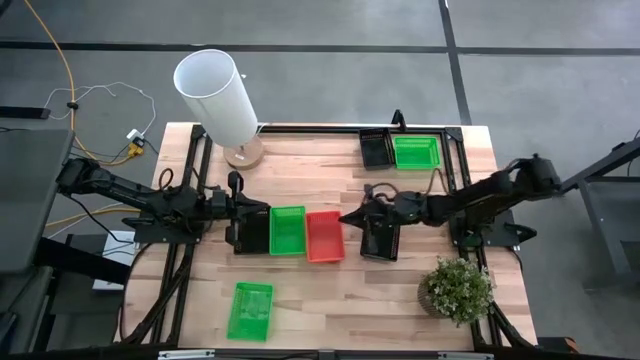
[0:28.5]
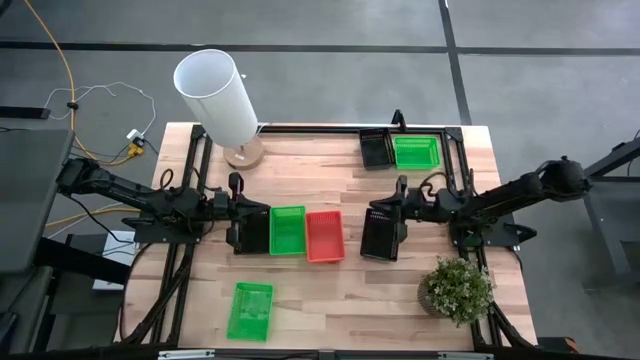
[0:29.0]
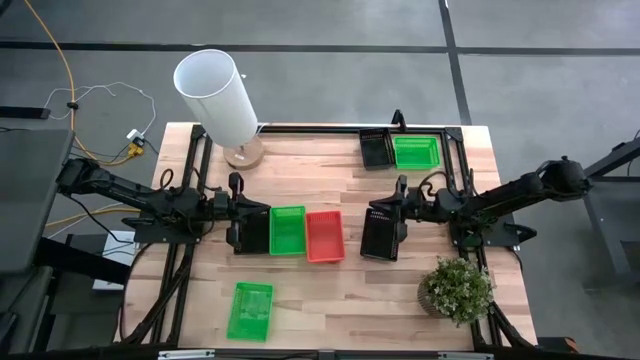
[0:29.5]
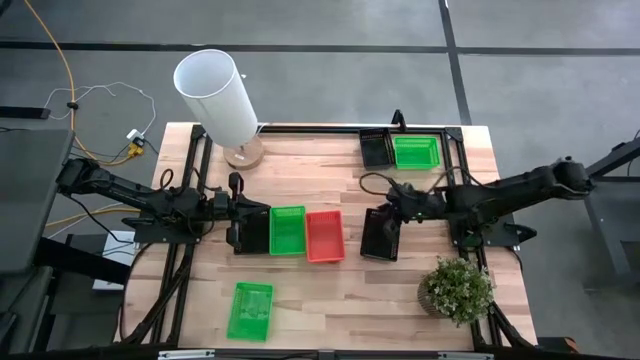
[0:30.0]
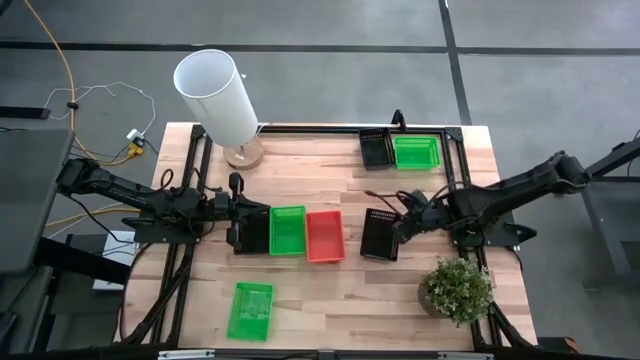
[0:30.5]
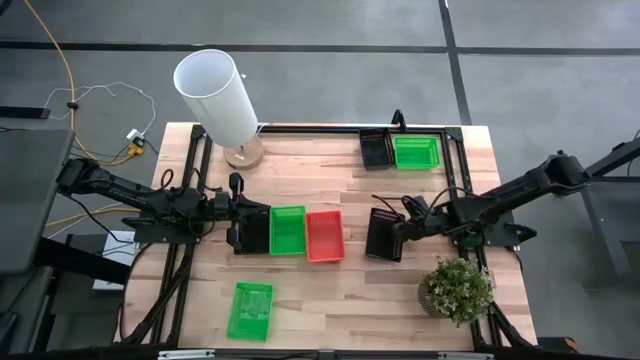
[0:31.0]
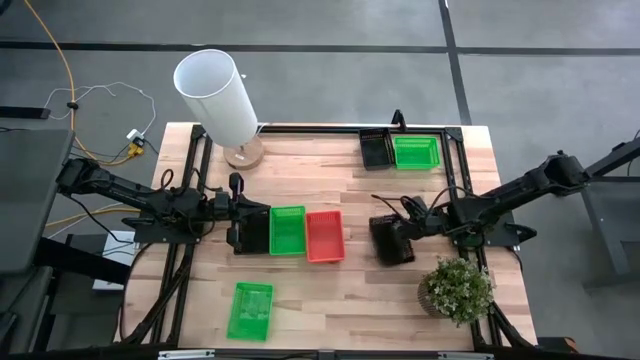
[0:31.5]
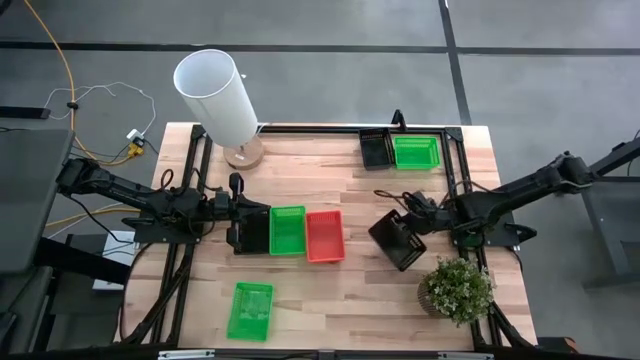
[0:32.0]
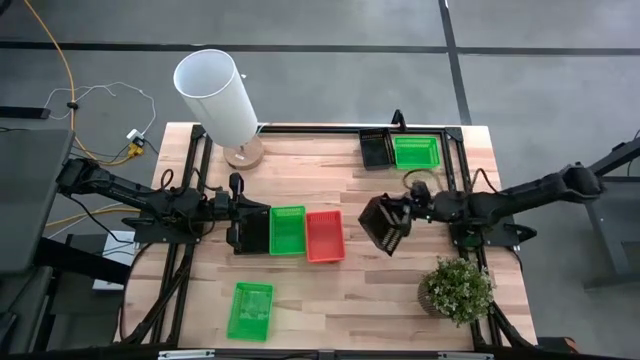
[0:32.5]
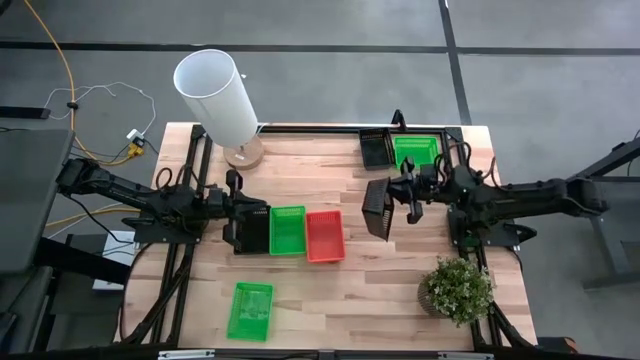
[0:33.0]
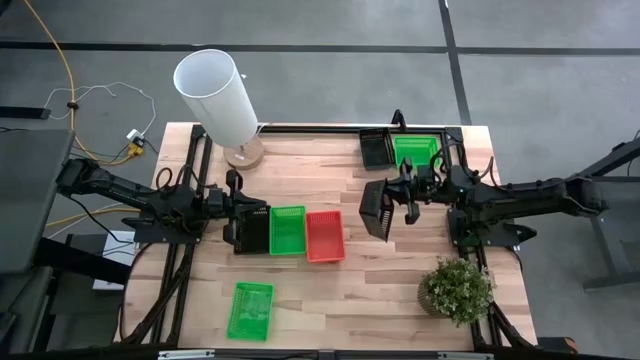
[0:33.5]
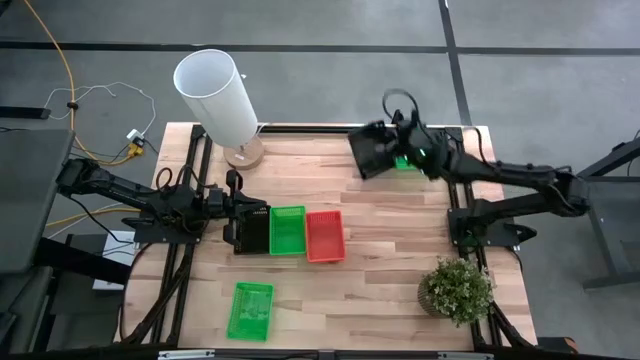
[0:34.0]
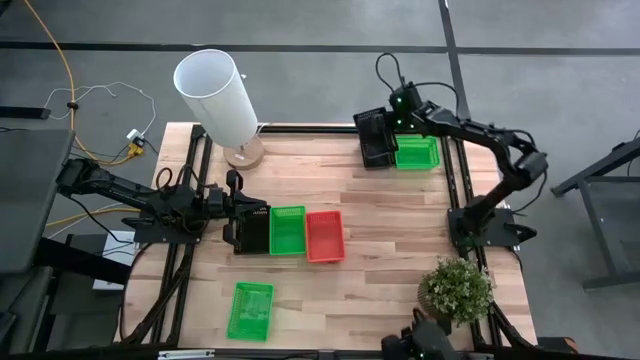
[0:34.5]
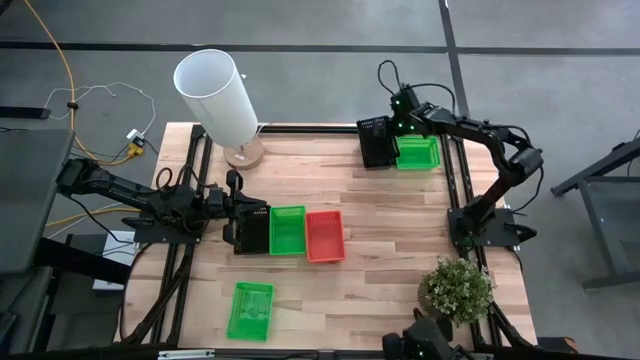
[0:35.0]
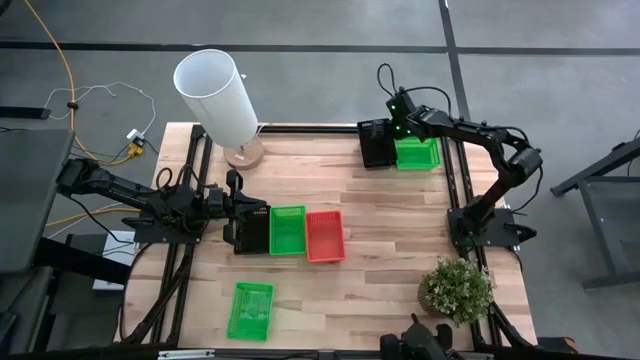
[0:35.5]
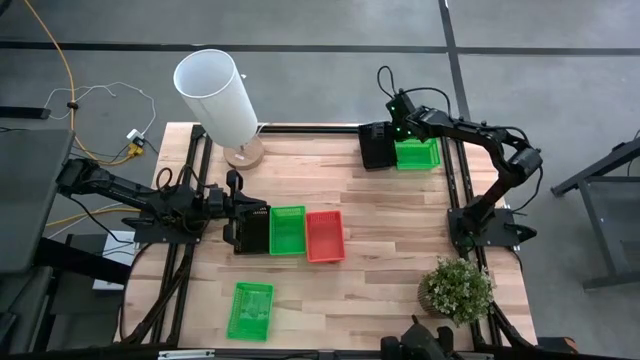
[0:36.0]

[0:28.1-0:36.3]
Stack the bottom right black bin on top of the top black bin

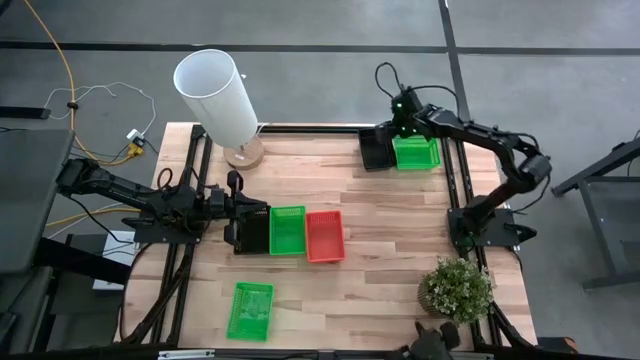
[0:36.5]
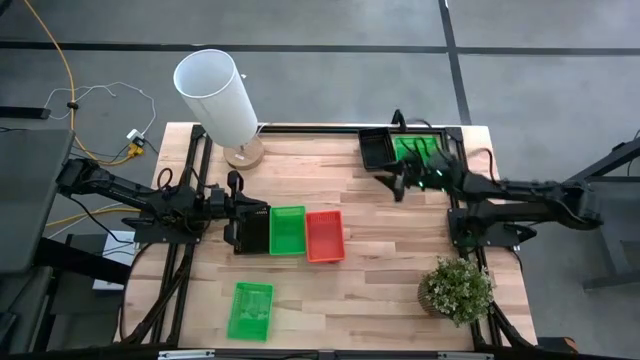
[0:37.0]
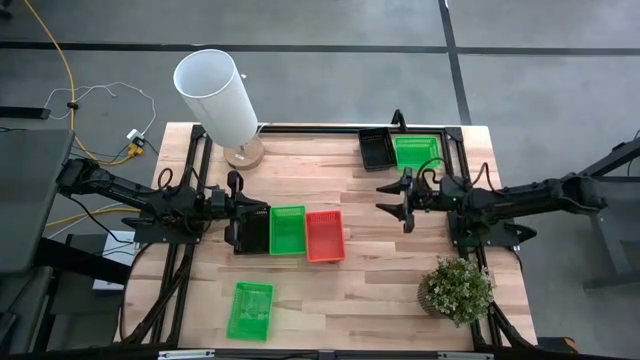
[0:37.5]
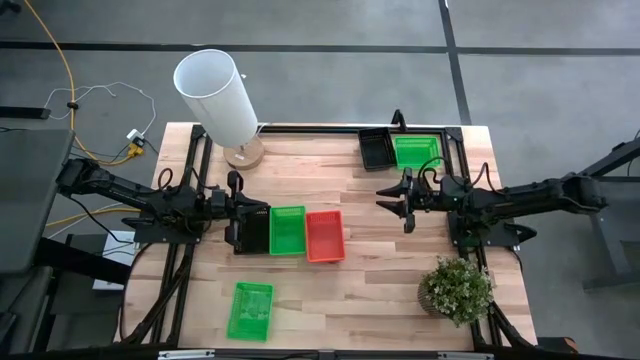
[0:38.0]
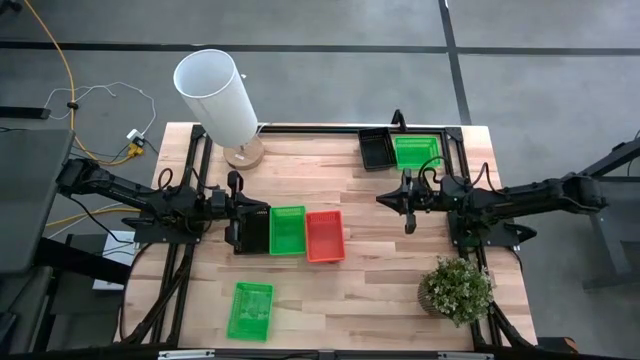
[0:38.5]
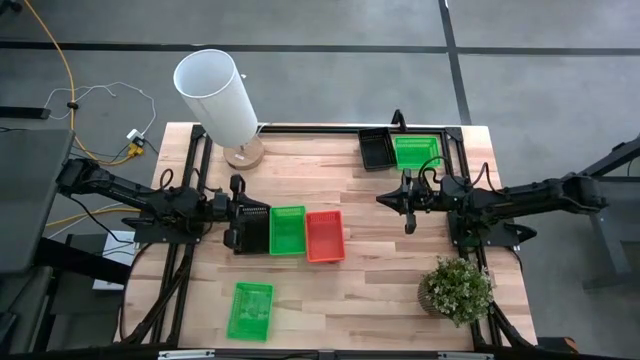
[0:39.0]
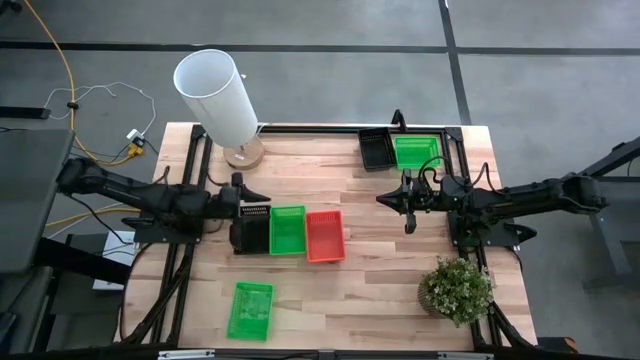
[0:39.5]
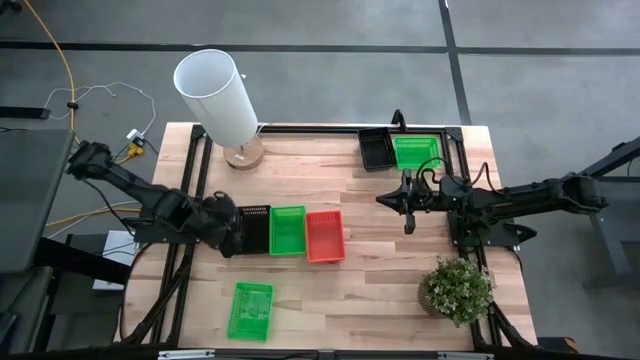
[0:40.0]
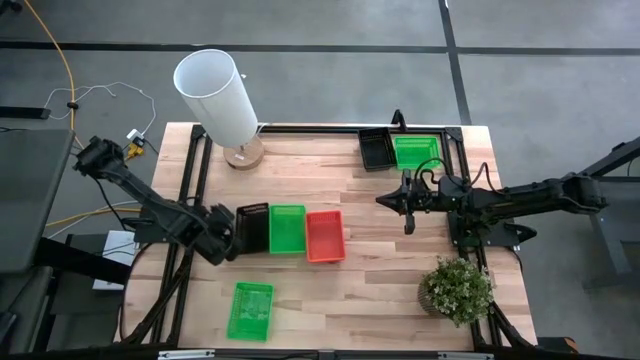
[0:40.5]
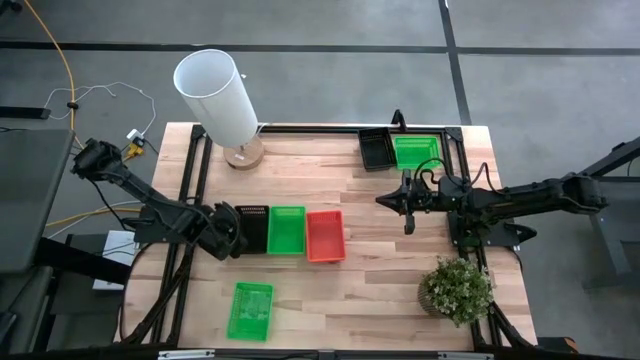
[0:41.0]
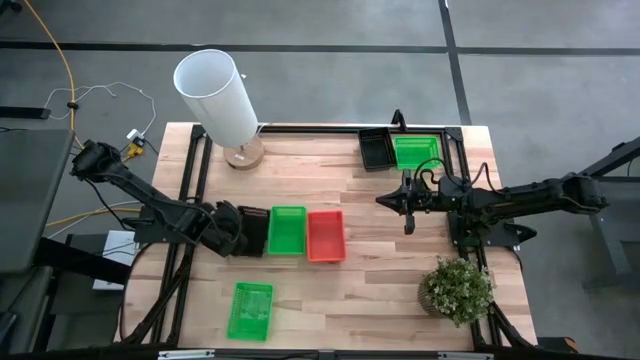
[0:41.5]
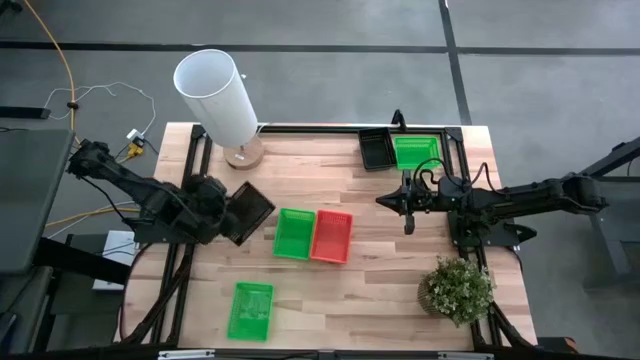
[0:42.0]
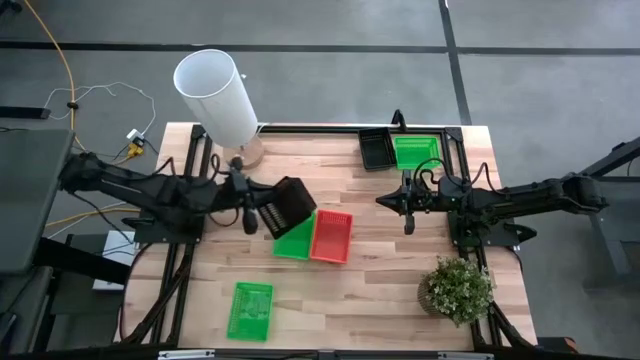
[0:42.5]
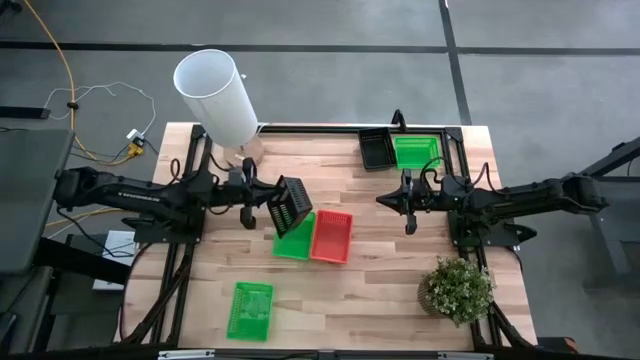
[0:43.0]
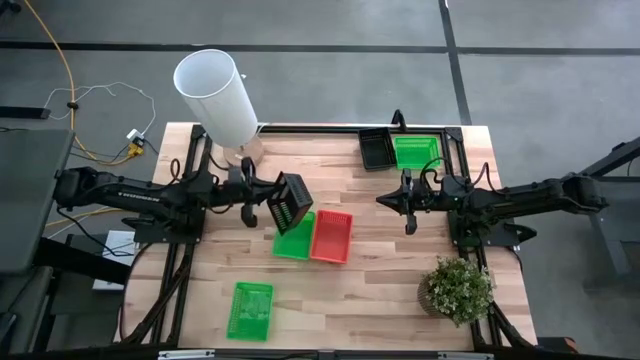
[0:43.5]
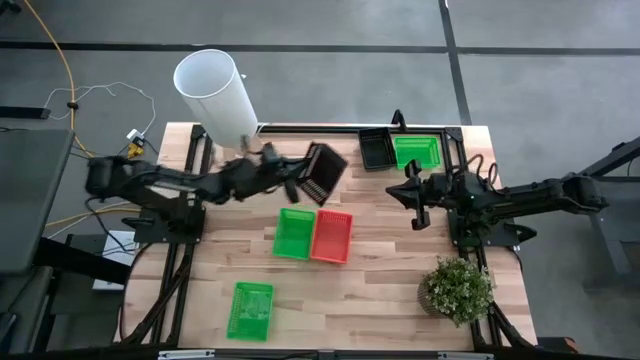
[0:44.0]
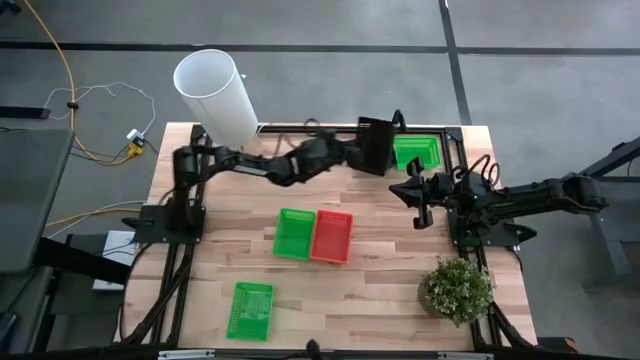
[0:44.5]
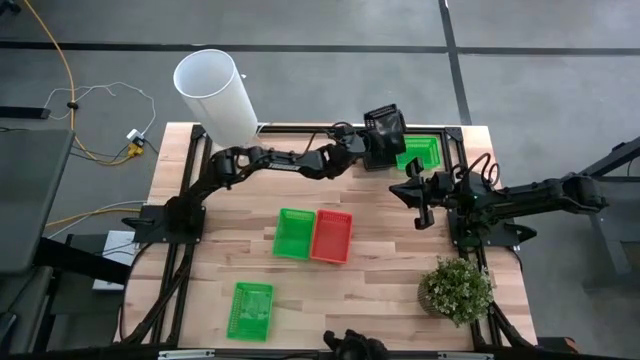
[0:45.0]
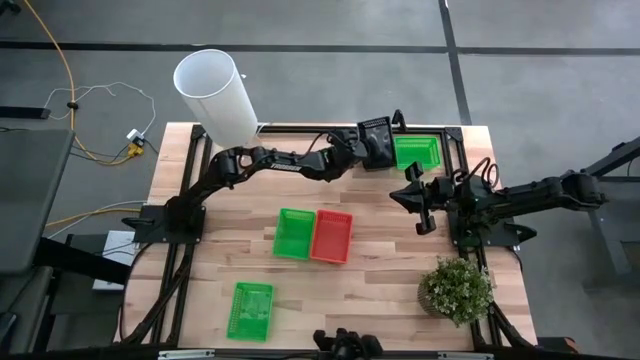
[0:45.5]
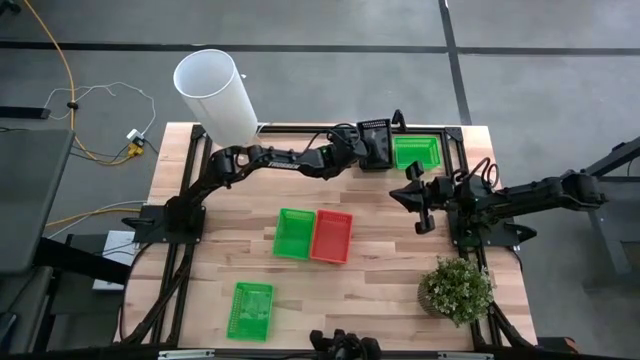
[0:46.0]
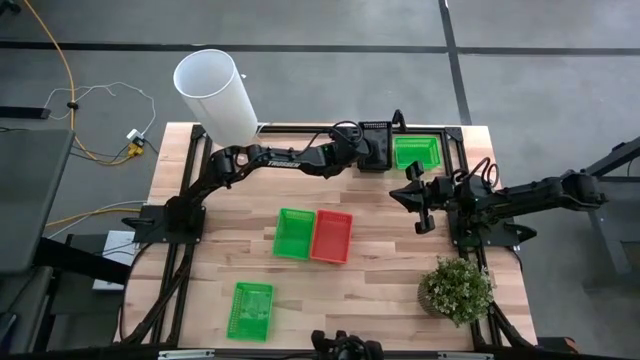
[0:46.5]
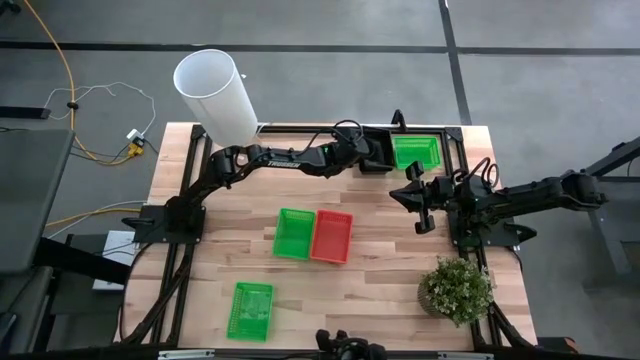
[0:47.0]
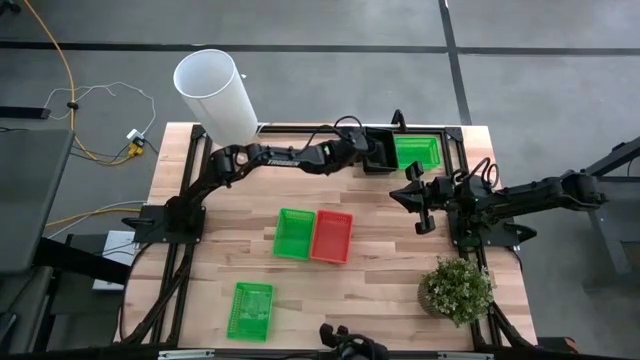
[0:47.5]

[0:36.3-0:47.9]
Stack the bottom black bin on top of the top black bins
